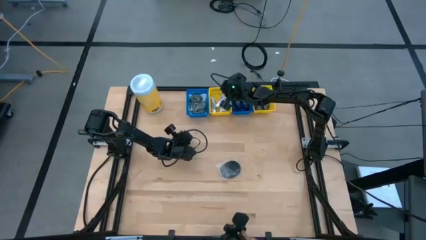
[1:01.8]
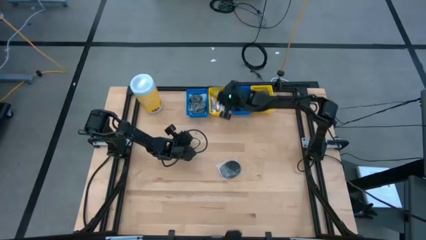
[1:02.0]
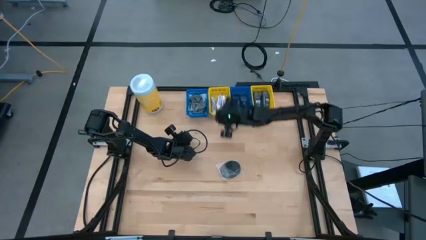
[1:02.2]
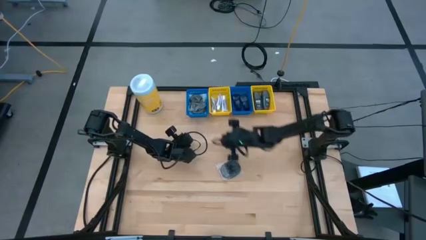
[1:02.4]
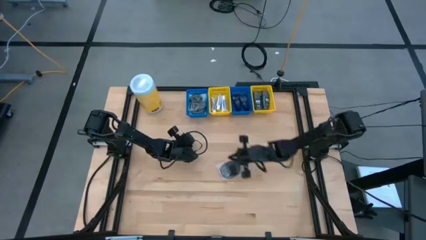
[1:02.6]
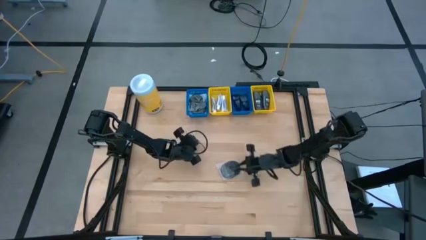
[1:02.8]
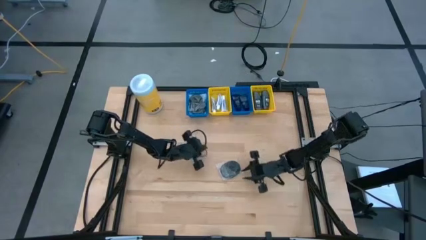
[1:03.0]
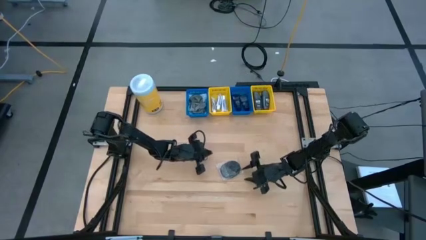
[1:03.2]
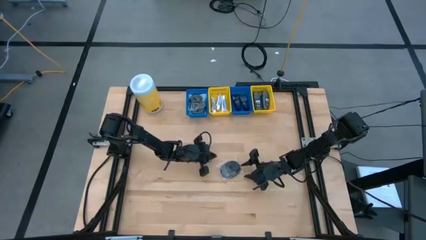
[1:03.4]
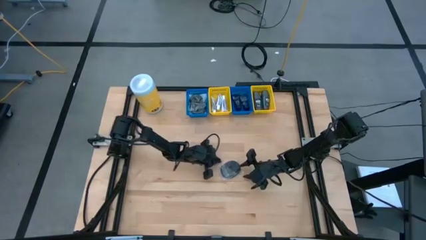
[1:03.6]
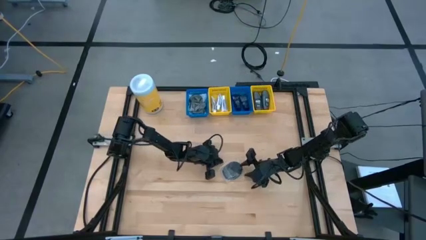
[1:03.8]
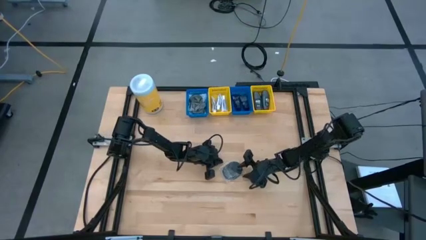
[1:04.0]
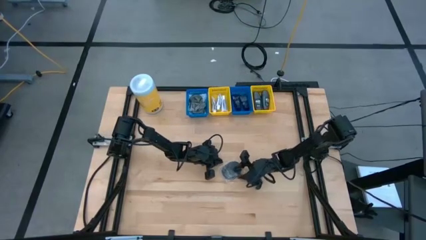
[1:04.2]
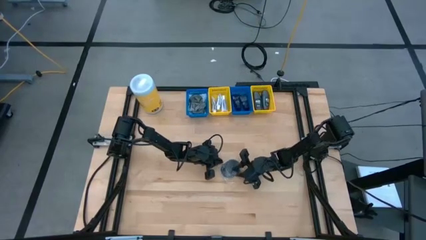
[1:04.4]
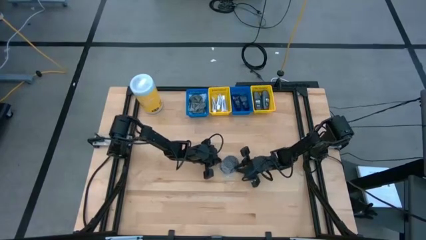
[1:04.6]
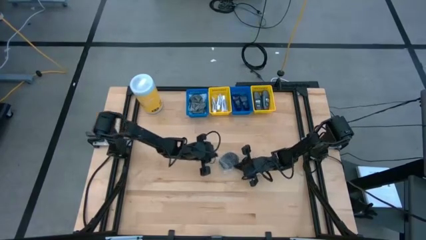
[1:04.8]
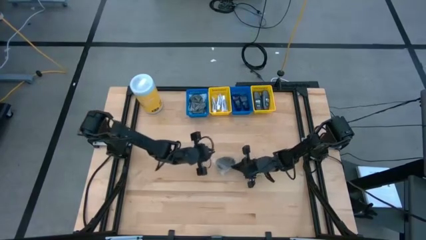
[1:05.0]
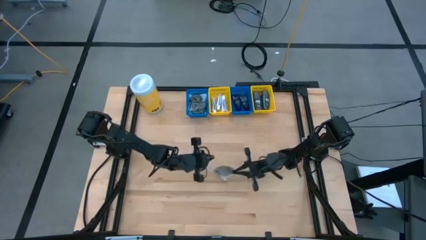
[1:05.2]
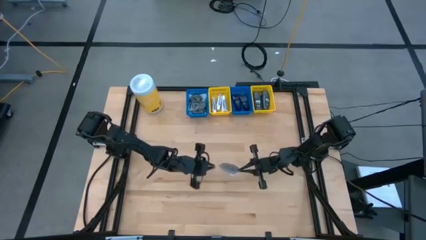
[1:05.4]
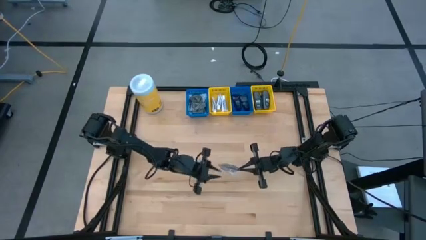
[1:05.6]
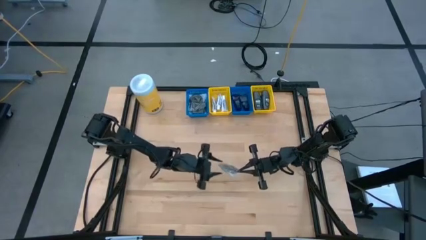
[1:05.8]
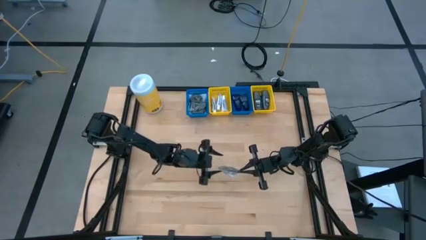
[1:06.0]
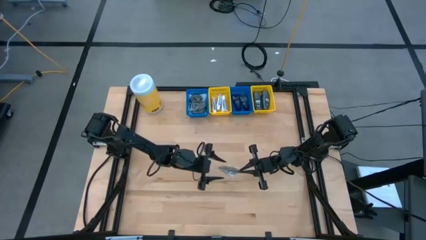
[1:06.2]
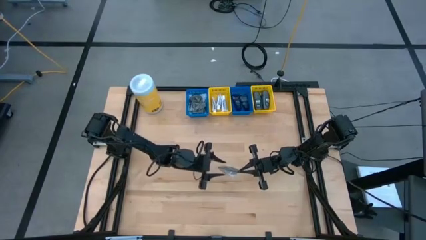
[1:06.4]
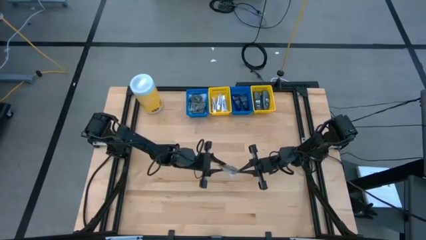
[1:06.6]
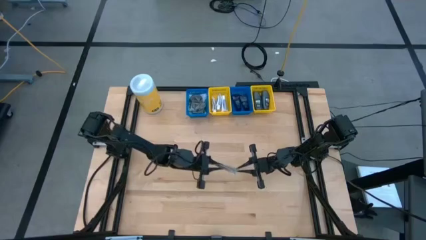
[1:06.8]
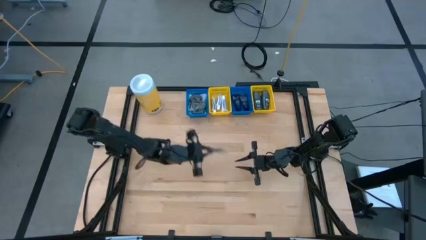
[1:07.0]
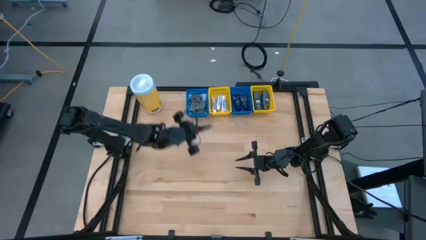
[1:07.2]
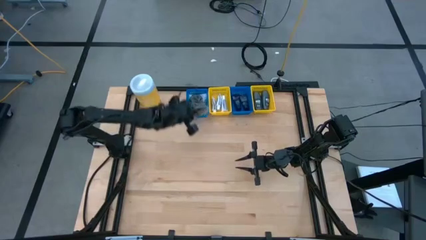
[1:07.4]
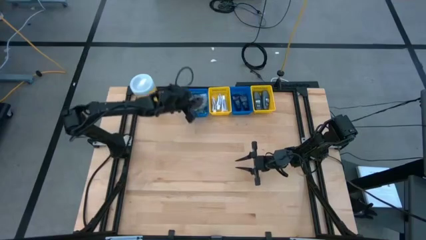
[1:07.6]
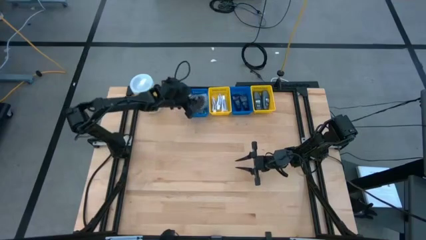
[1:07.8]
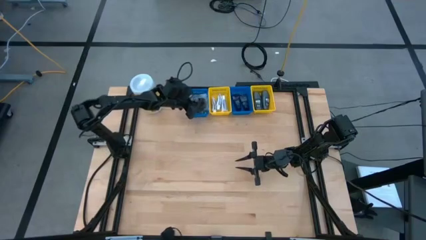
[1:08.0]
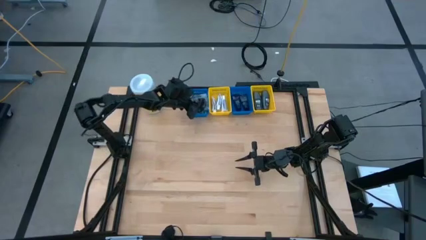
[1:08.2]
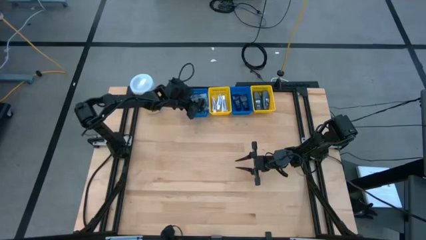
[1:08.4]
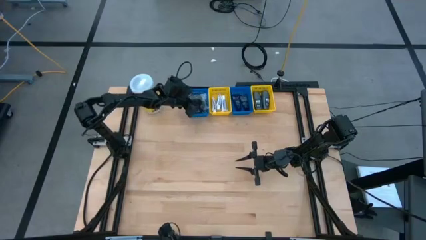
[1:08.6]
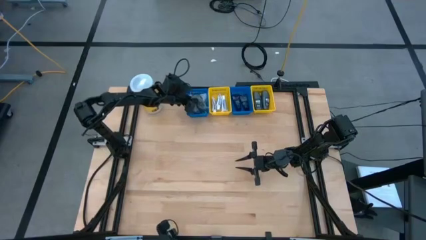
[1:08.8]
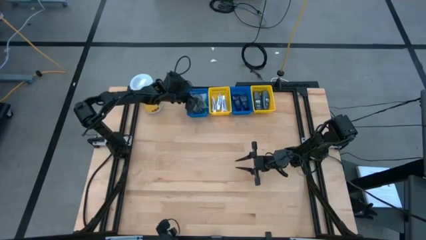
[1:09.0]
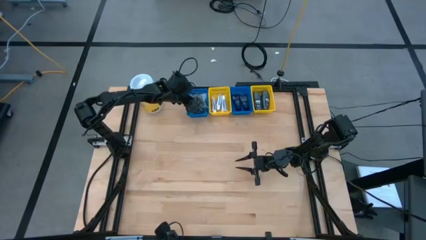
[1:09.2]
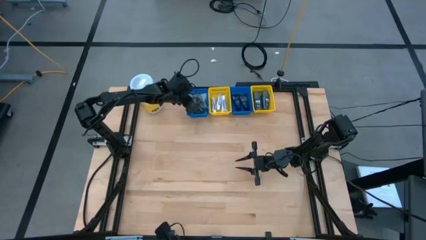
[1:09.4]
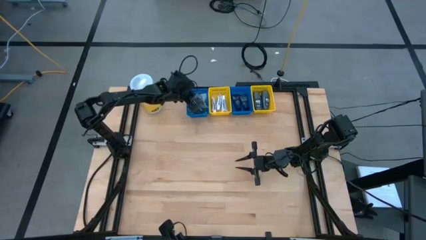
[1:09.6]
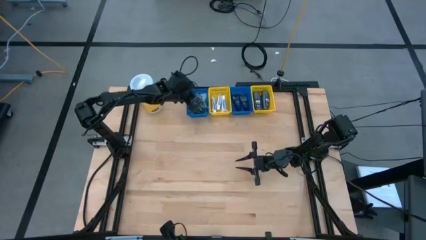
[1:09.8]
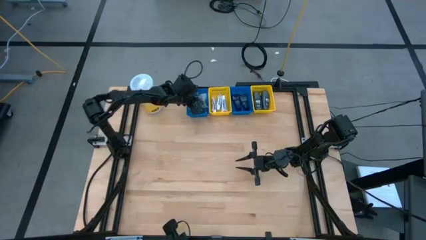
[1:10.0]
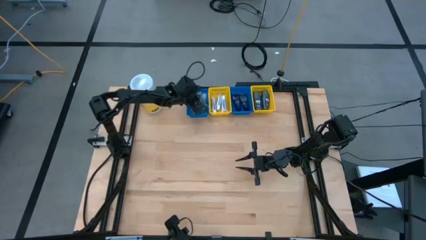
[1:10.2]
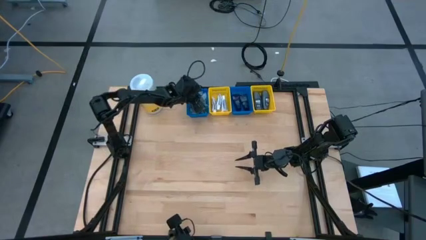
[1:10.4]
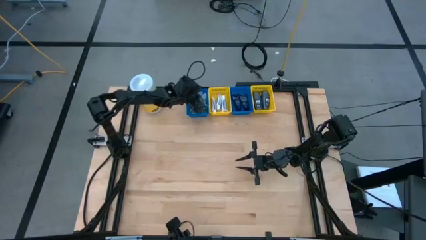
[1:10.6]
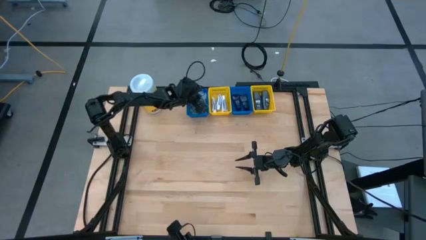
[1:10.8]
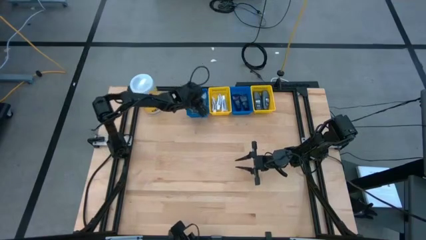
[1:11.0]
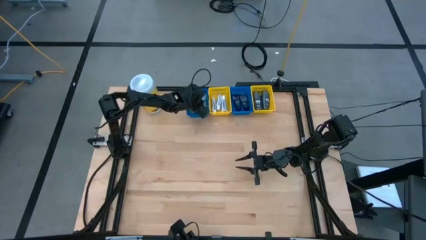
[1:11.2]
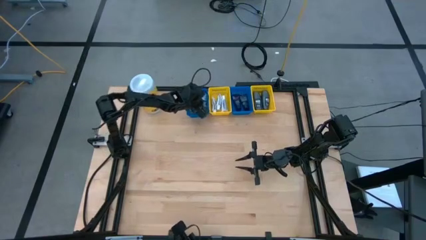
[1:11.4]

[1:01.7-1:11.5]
Task: Pick & Place Travel size toiletries
Put the black comb into the left blue bin

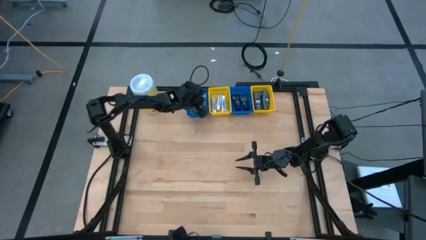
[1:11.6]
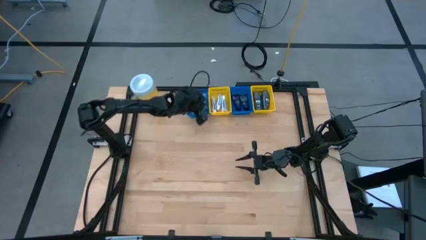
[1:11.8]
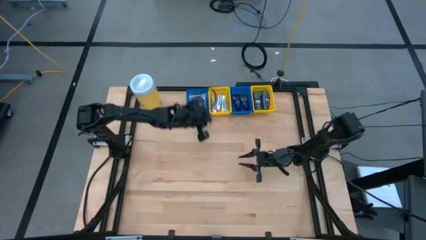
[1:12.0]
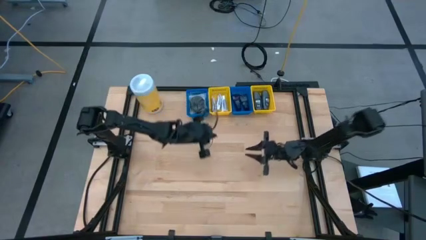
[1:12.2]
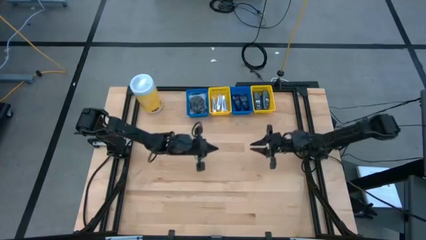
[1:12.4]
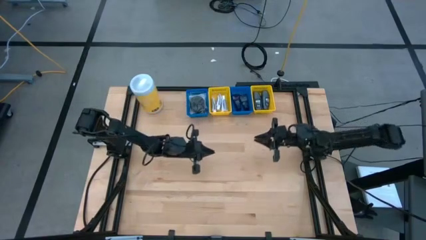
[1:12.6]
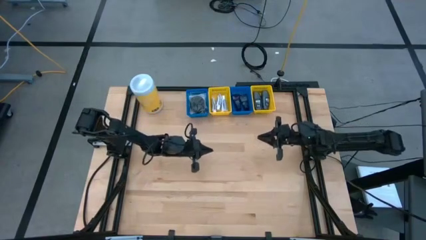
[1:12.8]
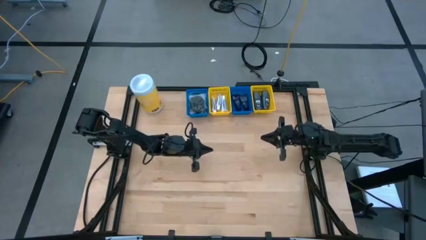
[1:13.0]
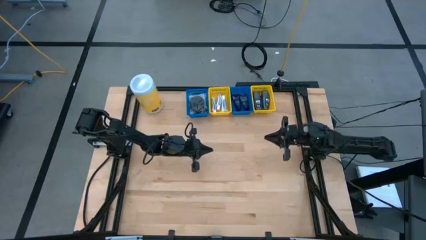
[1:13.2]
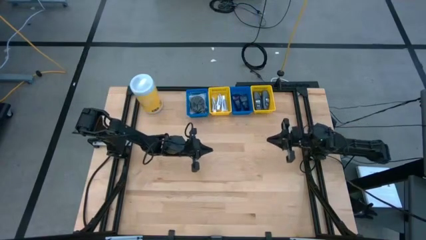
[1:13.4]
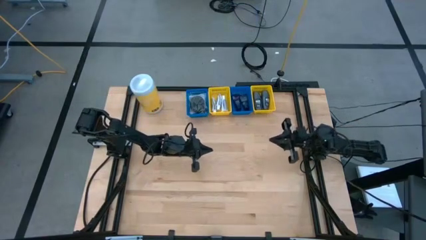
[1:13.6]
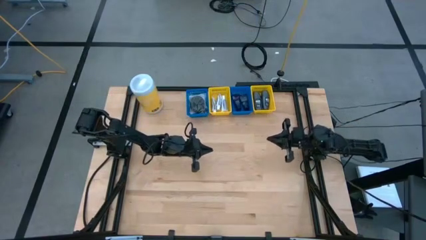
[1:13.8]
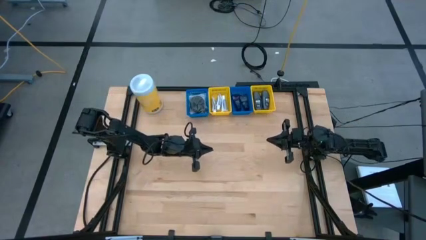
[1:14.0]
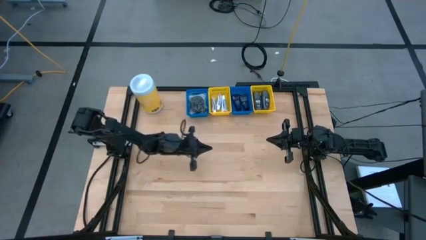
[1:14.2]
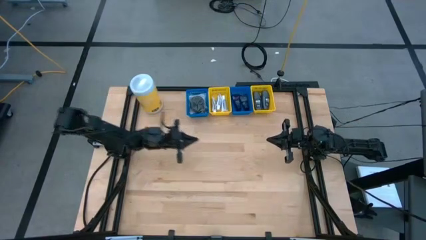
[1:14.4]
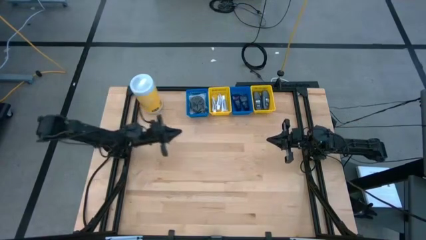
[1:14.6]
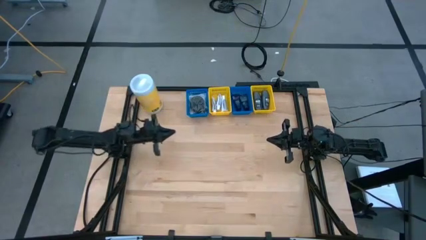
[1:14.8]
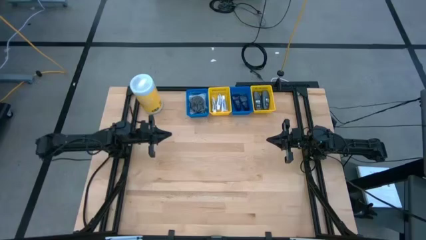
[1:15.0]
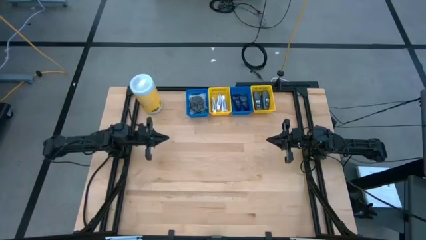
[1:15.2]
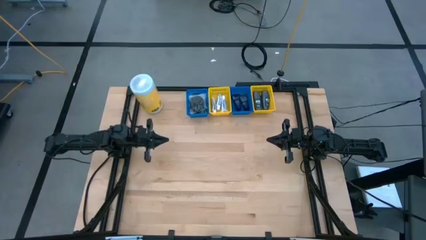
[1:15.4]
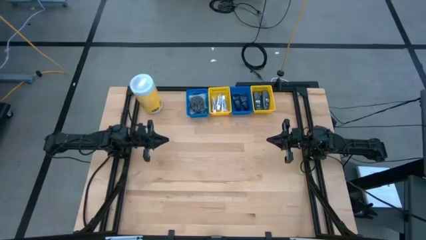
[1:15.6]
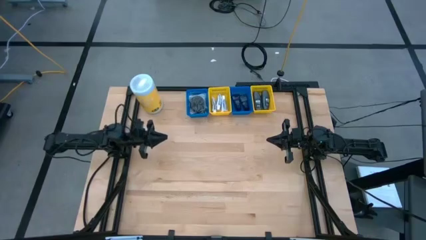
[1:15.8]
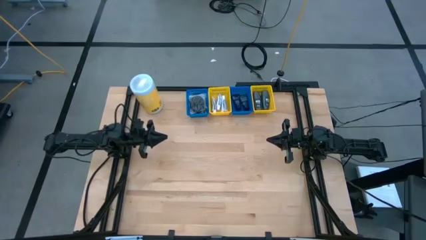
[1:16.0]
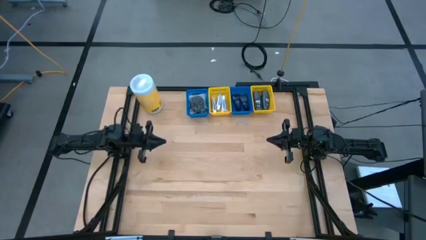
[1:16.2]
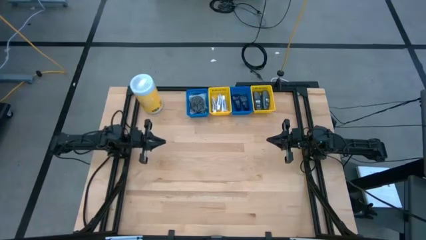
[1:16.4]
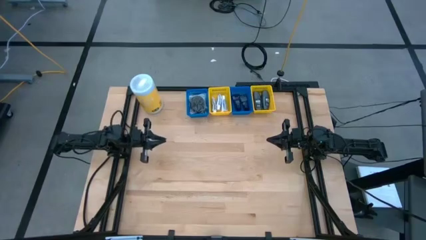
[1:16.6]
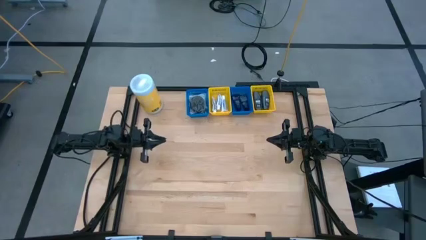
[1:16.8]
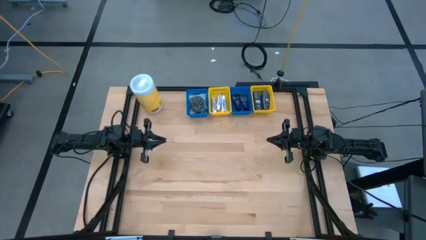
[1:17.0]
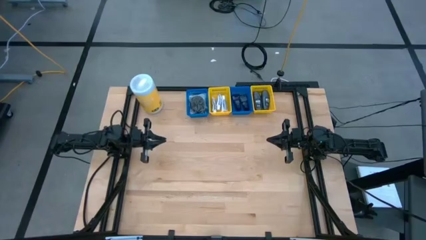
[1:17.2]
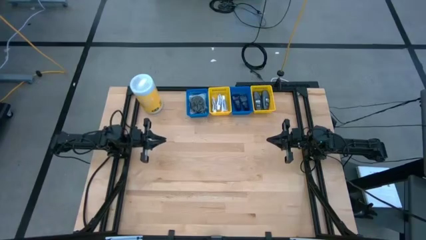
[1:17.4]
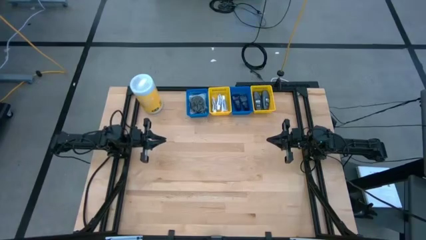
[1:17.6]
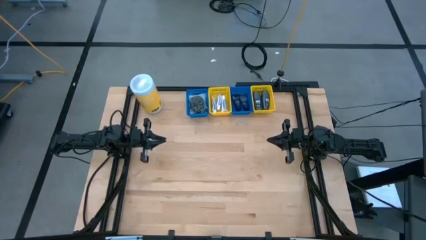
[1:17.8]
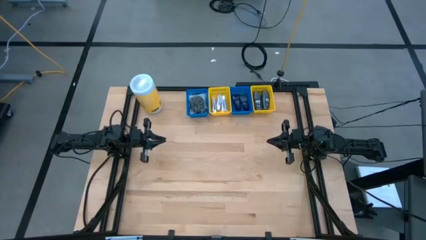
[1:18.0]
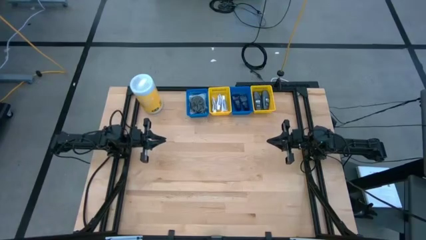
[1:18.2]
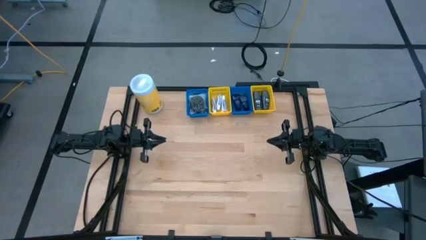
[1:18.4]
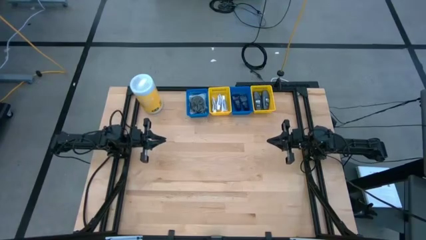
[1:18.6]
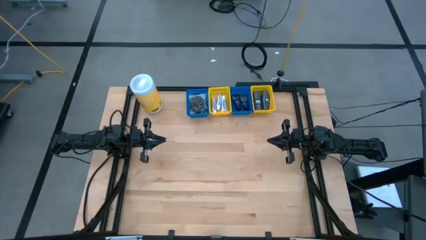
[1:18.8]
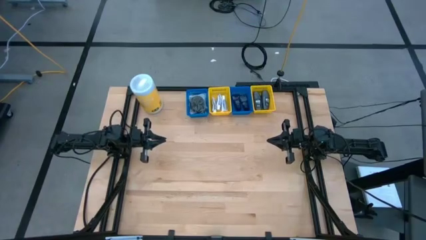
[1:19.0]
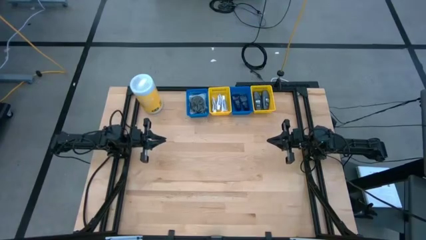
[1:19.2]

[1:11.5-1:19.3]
Return to Home Position

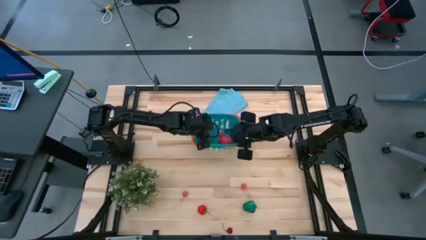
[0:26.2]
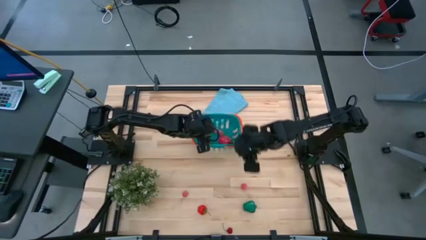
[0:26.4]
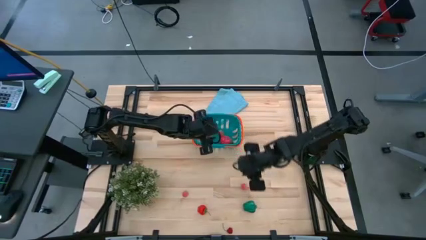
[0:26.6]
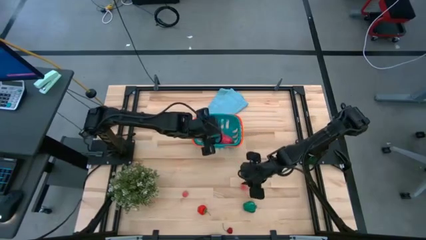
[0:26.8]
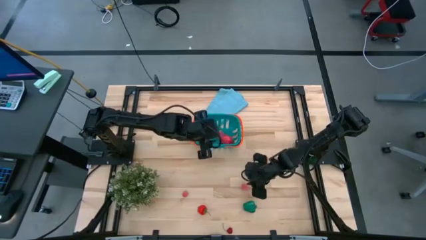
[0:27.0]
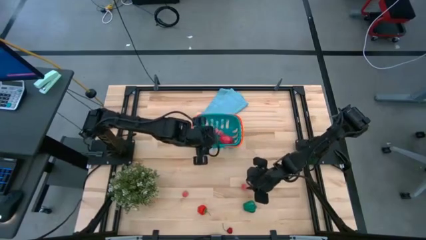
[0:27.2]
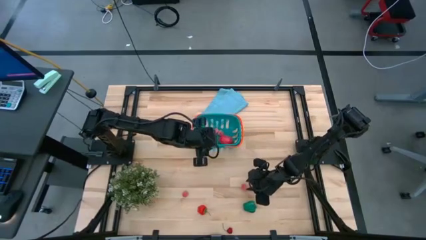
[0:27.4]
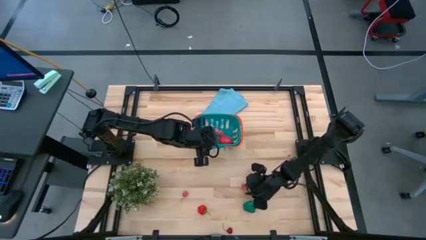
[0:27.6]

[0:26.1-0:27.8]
Task: Pick and placing Produce into tupperware
Put the pink peach into the bin
